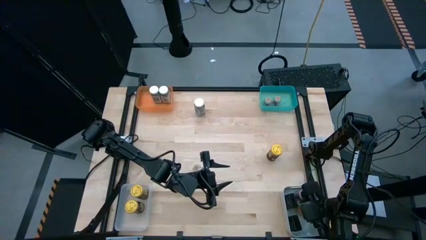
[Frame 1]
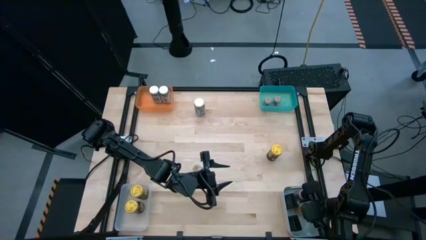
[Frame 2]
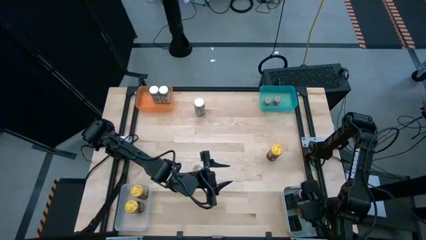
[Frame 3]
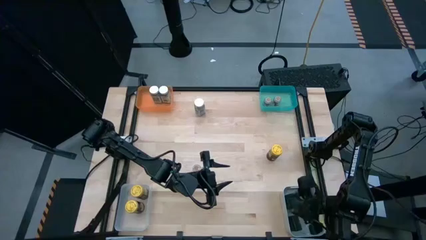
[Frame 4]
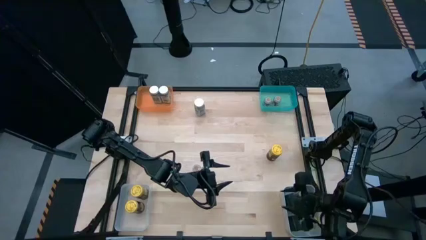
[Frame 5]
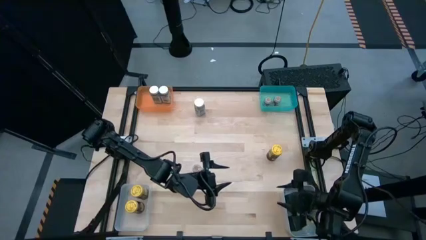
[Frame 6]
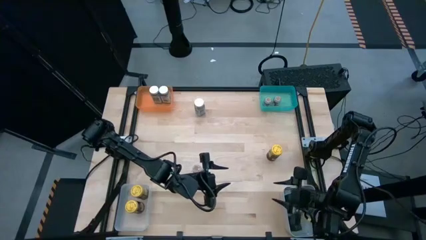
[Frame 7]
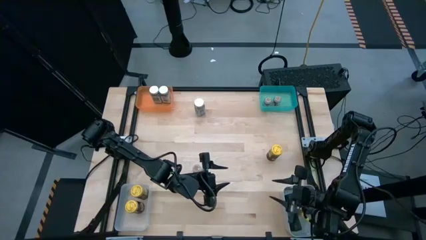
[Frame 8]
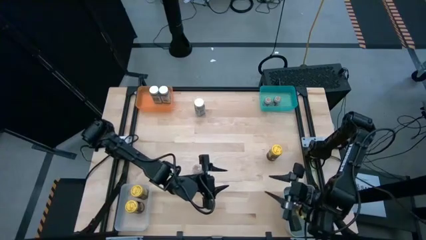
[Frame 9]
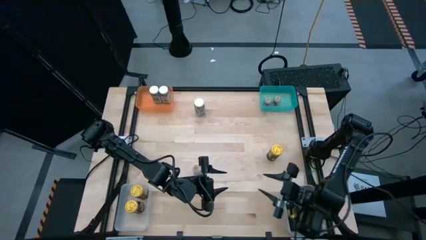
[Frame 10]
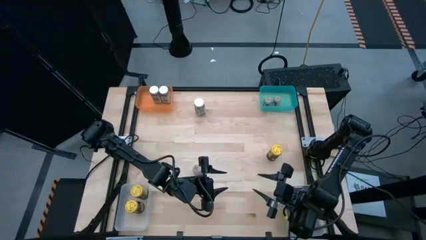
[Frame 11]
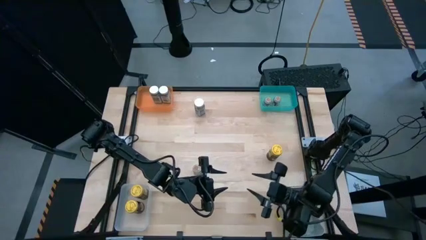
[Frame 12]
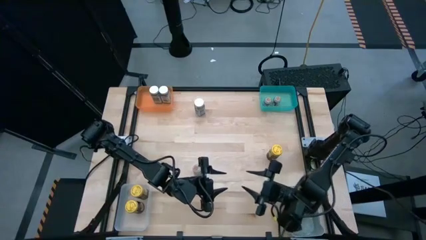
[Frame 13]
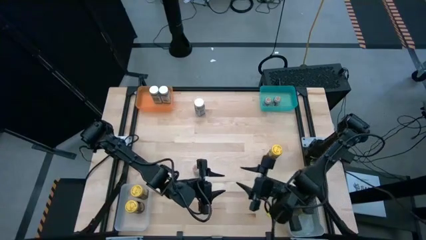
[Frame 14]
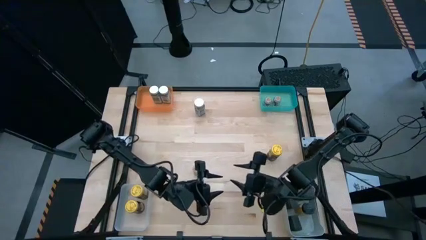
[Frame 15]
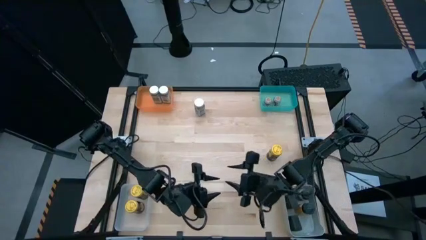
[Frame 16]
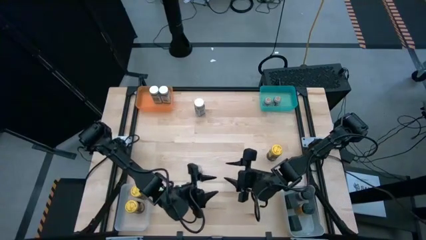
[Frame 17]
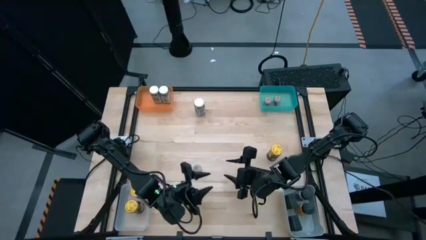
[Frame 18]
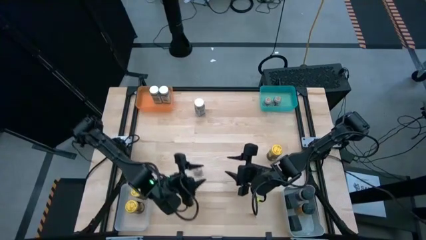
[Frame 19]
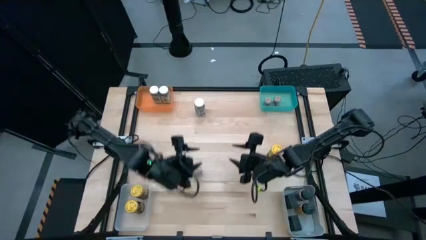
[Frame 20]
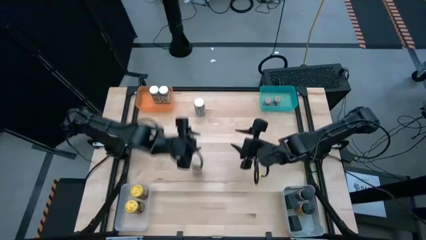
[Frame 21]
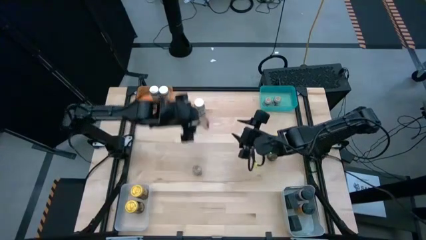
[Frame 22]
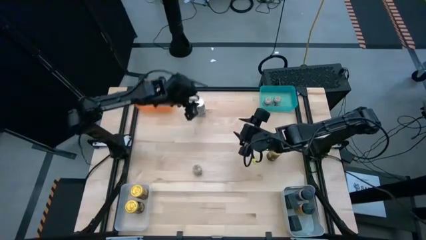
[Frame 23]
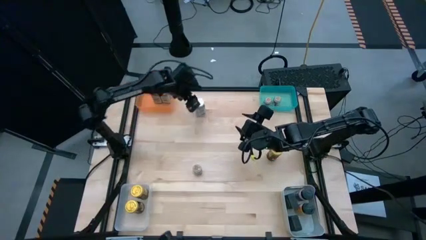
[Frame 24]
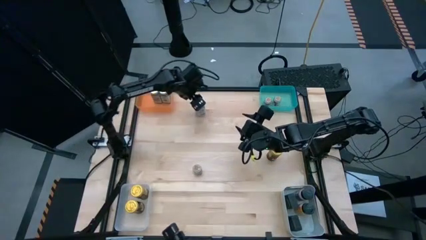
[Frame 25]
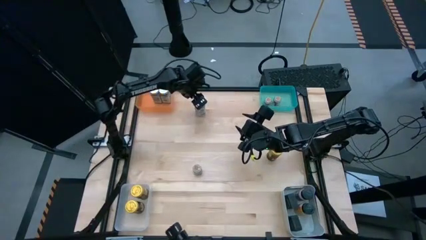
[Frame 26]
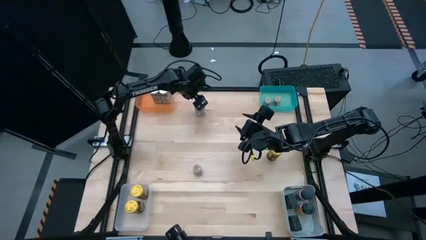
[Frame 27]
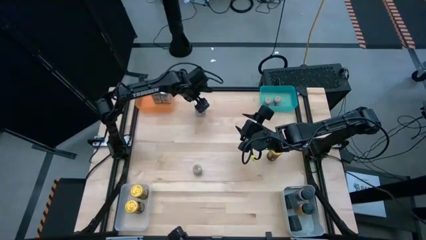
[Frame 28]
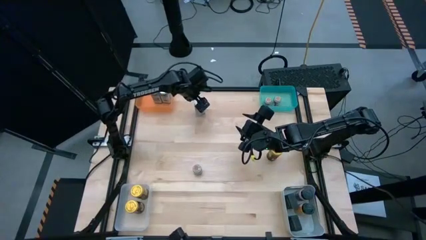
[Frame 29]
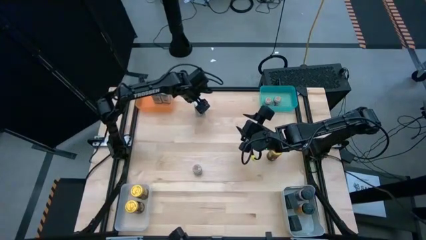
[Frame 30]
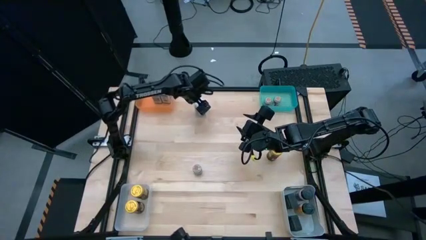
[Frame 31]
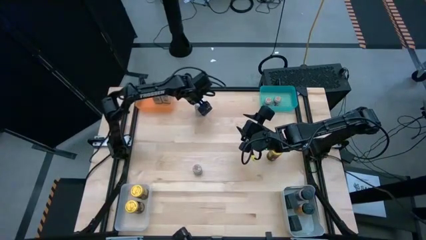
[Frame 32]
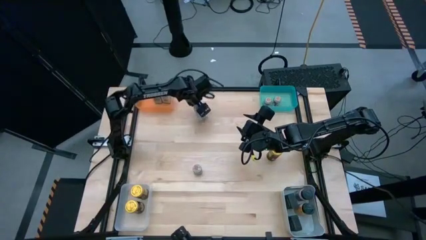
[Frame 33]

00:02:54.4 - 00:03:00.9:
Task: Sort spices by type
Put the white seasoning bottle into the orange bin

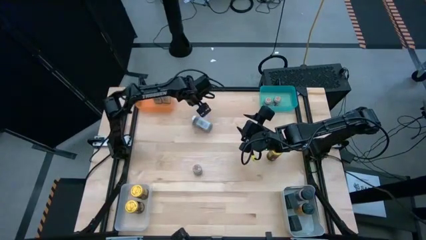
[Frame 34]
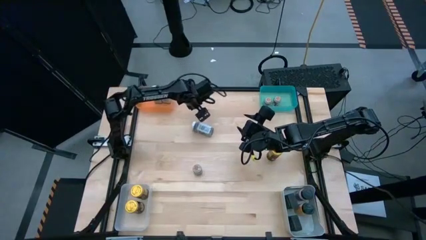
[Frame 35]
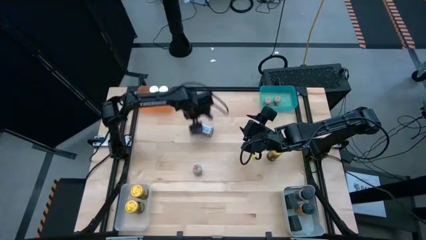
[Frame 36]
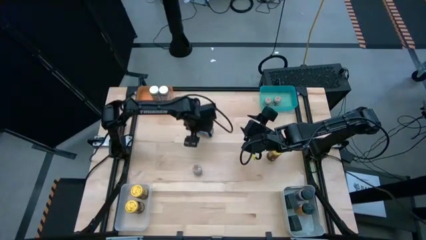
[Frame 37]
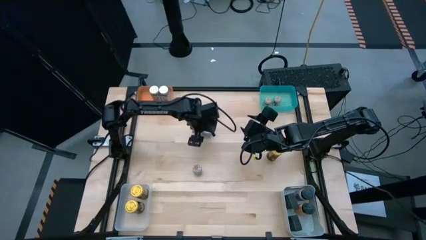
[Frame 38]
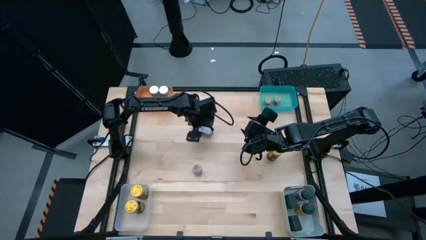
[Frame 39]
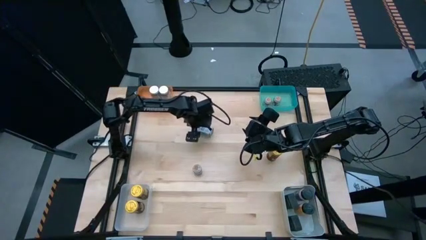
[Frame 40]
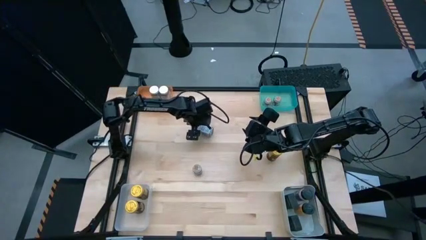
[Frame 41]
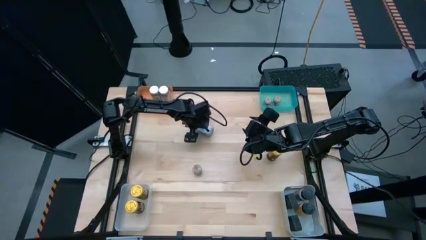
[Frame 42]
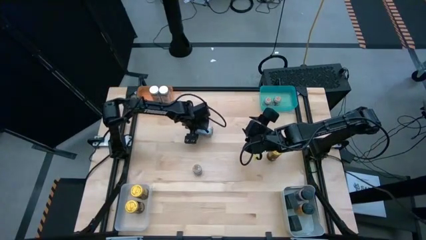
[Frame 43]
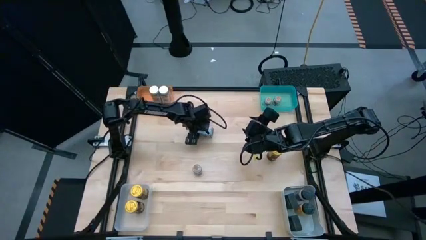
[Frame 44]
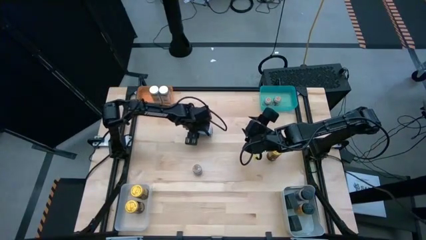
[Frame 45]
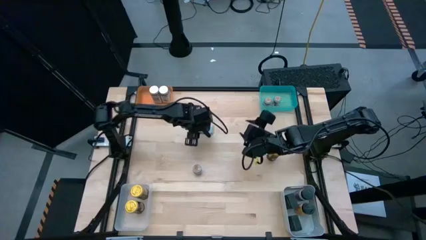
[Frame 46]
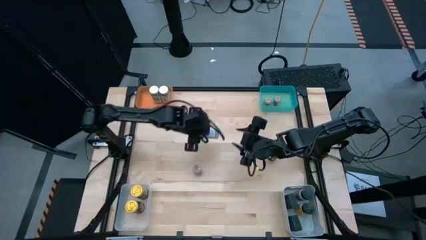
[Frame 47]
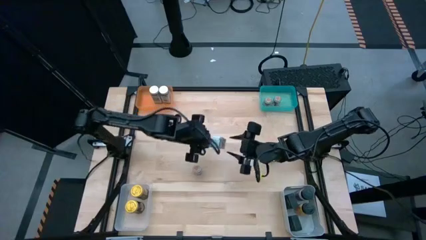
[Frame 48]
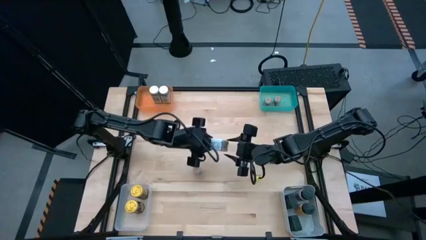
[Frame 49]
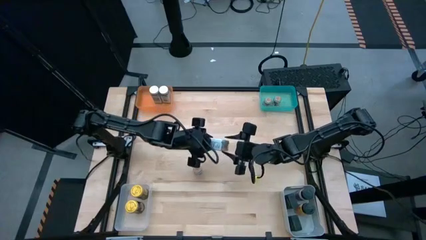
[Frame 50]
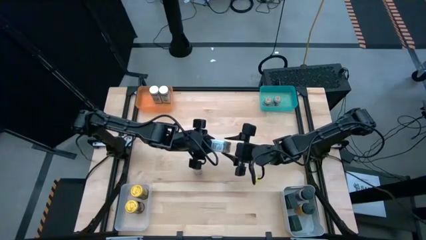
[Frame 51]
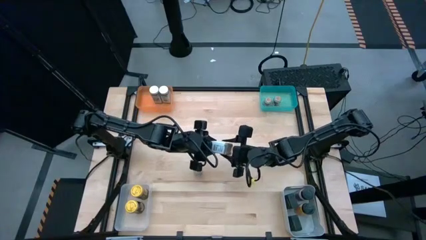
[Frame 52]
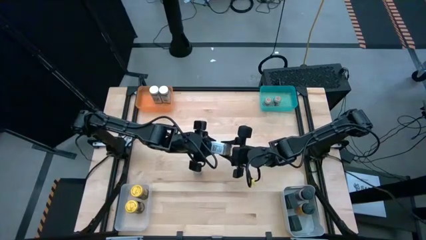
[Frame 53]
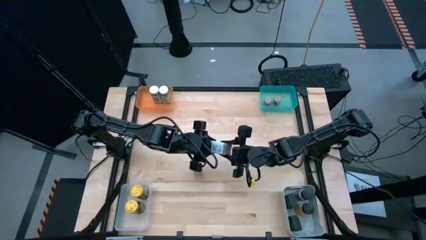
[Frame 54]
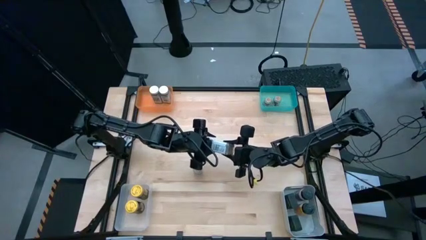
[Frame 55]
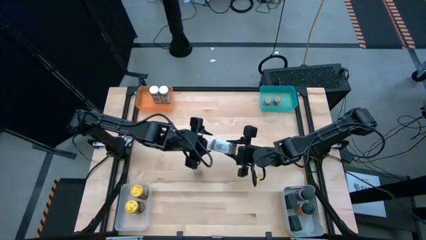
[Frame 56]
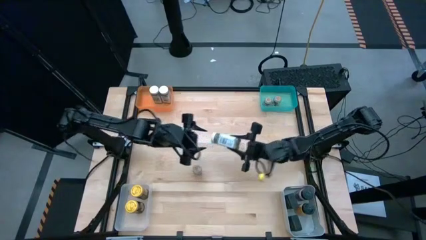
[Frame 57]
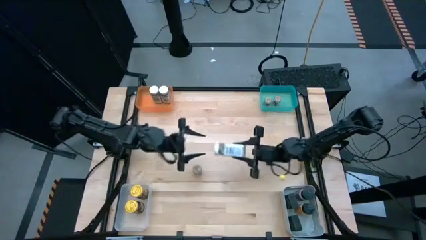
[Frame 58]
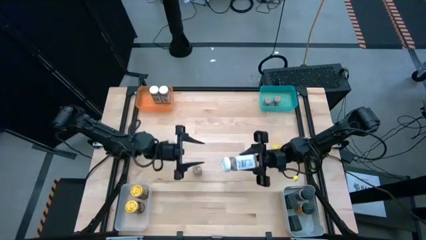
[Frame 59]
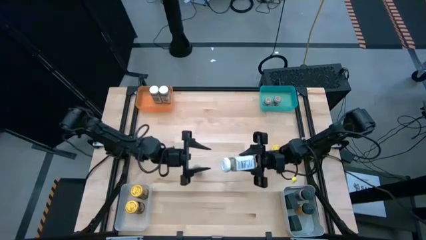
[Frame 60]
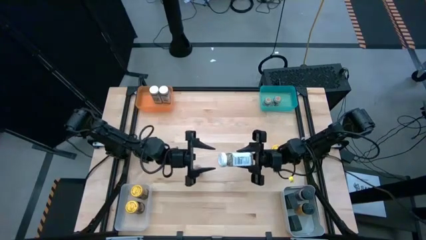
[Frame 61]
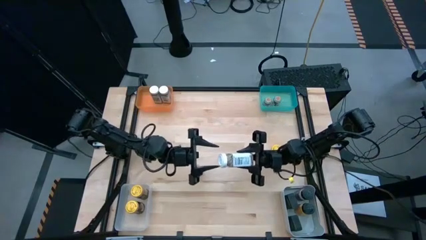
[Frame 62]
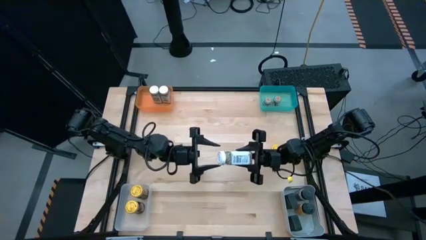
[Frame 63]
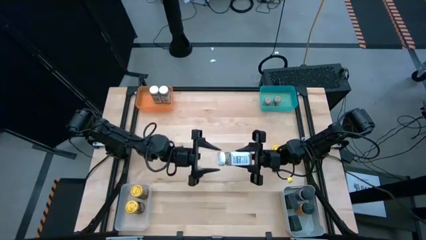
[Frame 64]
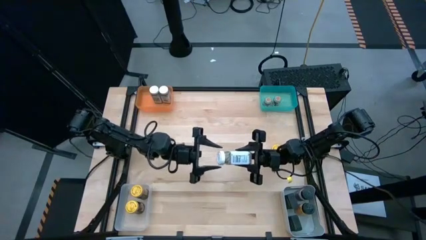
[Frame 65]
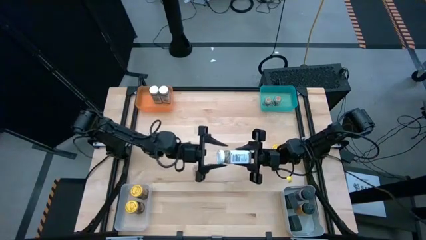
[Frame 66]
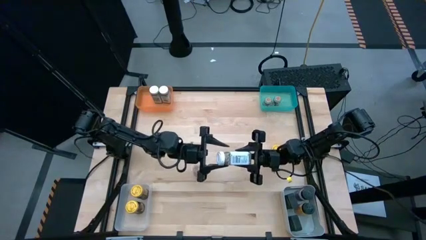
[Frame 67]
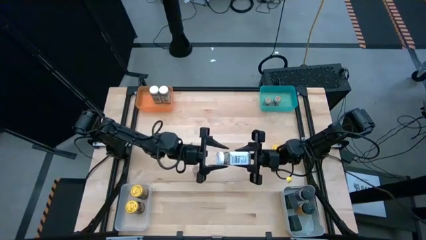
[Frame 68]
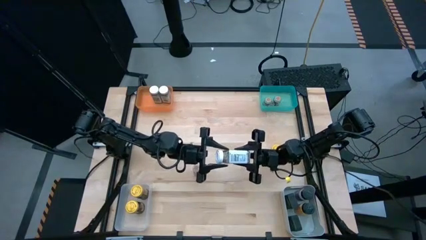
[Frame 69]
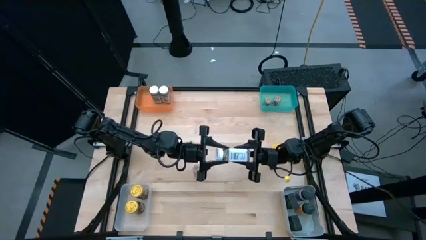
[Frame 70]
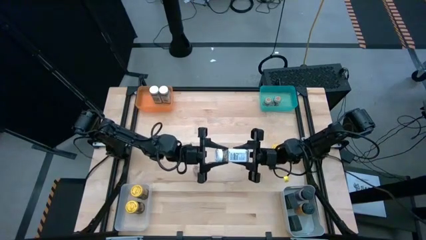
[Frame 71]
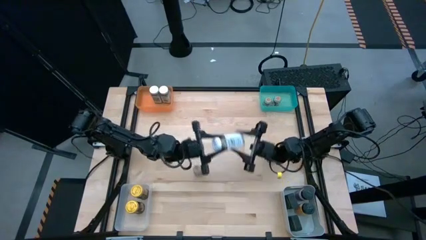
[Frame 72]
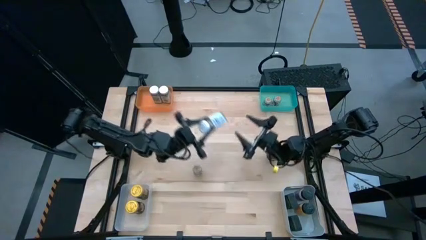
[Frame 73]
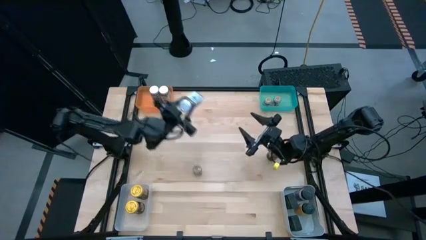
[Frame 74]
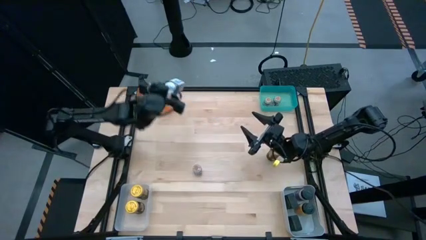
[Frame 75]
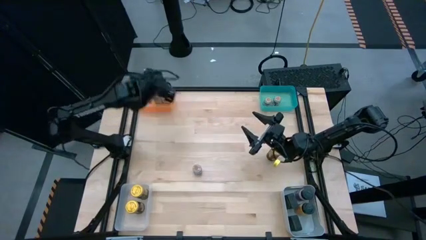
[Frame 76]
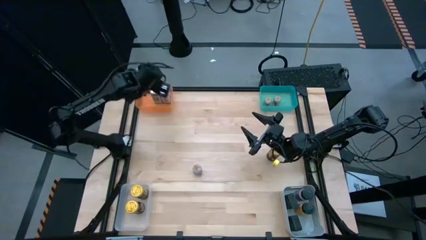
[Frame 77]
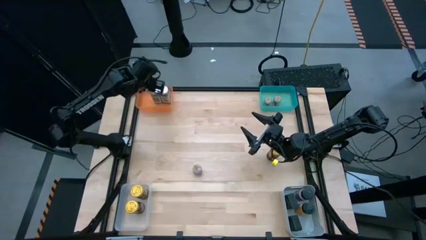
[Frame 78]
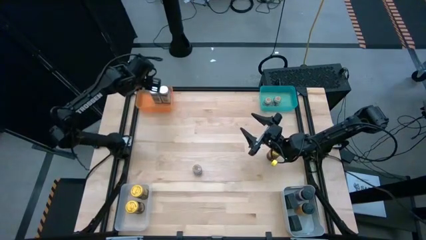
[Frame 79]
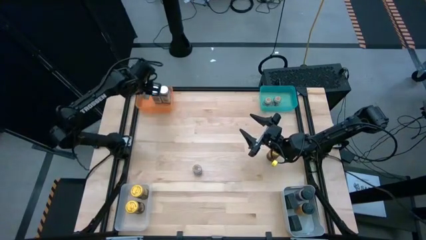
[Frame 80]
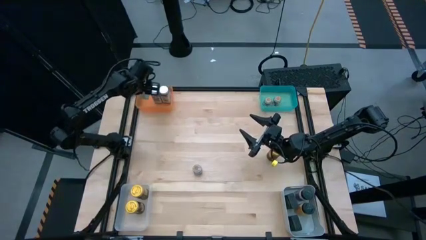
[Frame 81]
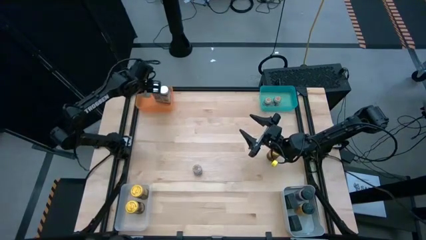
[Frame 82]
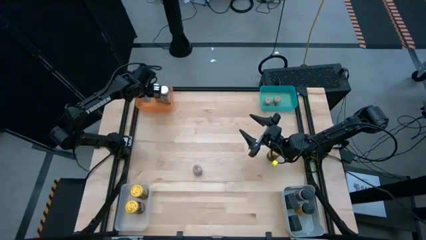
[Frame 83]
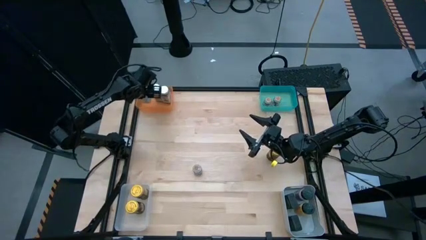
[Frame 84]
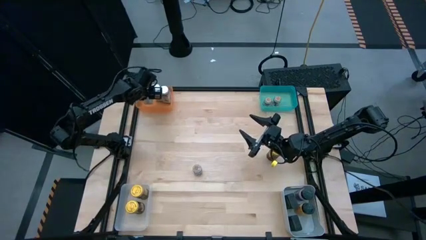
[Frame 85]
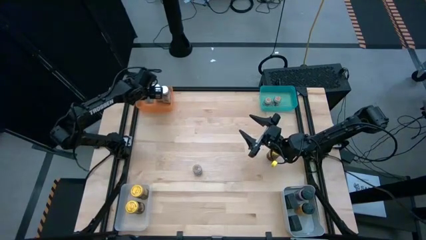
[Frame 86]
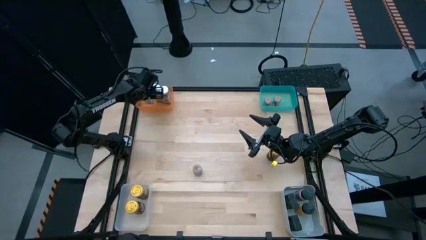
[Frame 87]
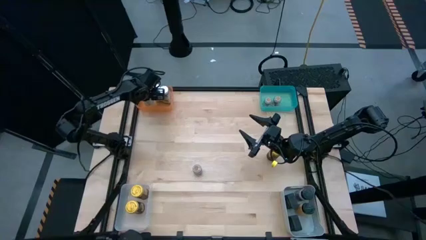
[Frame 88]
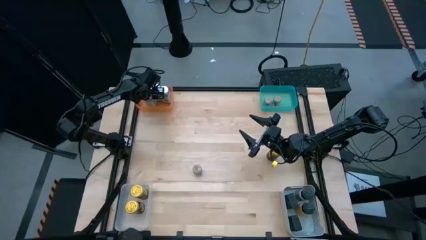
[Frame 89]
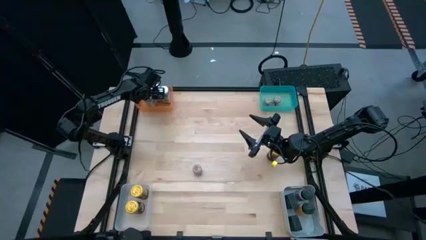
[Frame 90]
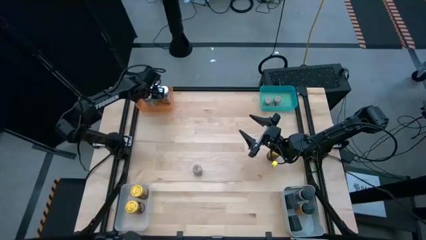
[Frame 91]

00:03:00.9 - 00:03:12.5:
Put the white seasoning bottle into the orange bin
